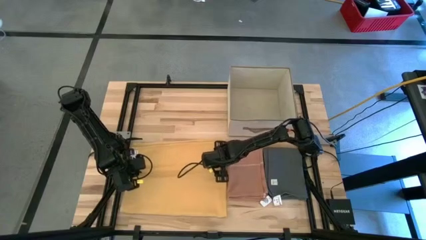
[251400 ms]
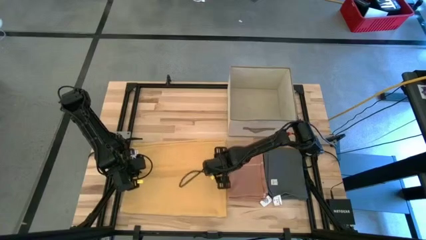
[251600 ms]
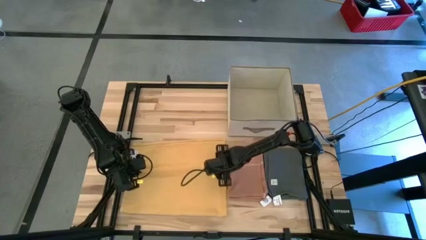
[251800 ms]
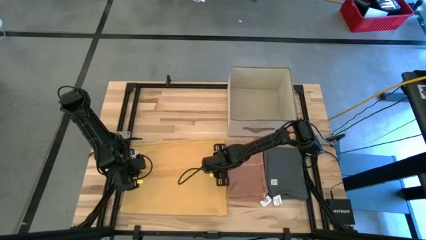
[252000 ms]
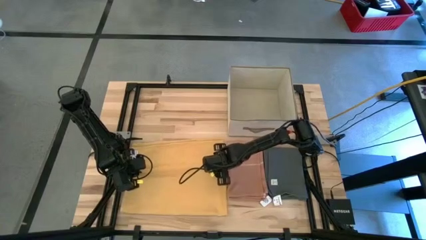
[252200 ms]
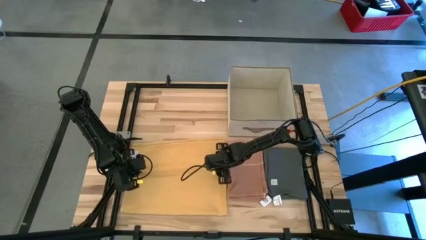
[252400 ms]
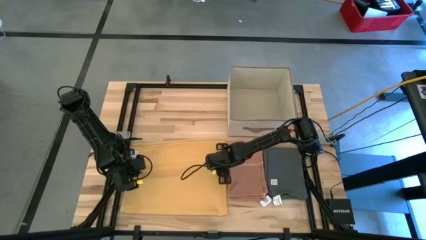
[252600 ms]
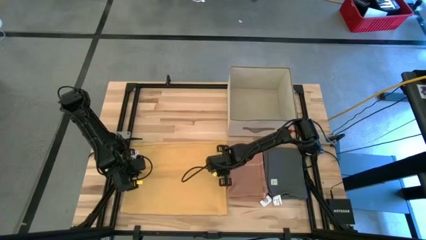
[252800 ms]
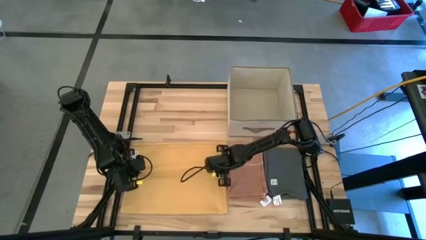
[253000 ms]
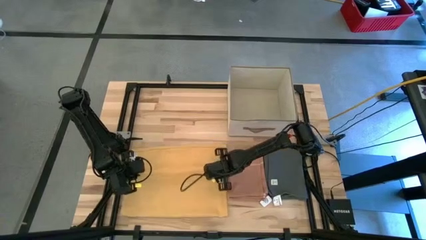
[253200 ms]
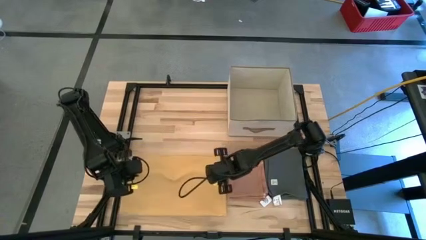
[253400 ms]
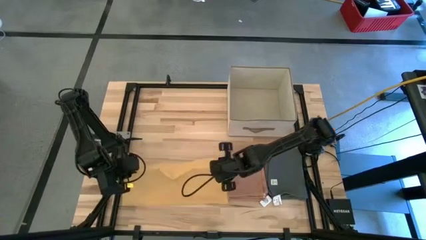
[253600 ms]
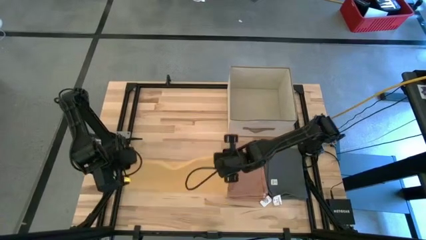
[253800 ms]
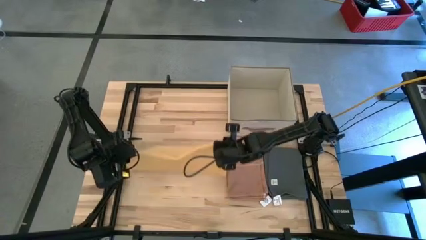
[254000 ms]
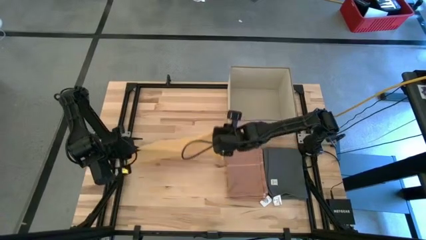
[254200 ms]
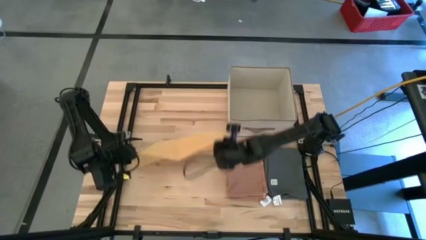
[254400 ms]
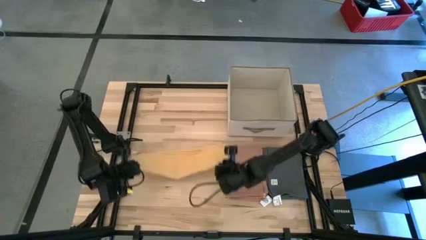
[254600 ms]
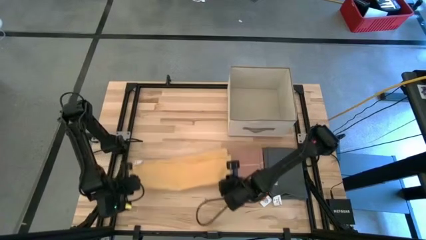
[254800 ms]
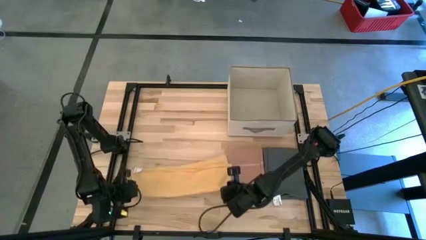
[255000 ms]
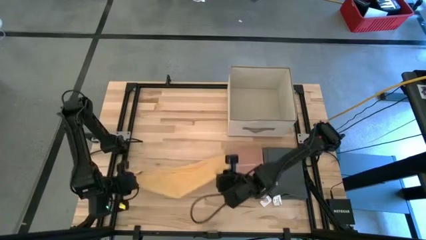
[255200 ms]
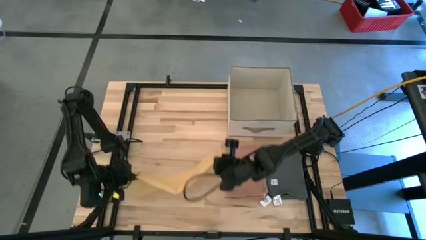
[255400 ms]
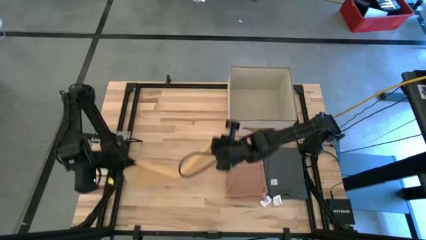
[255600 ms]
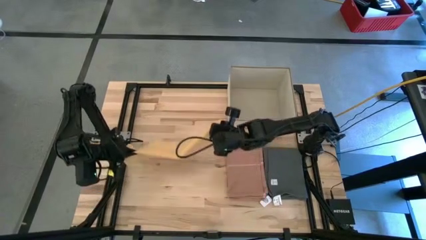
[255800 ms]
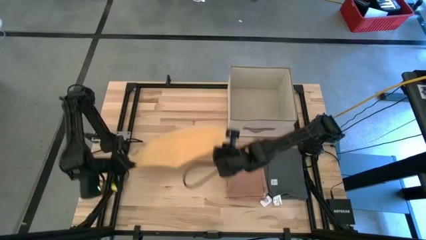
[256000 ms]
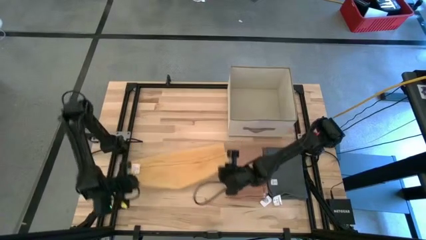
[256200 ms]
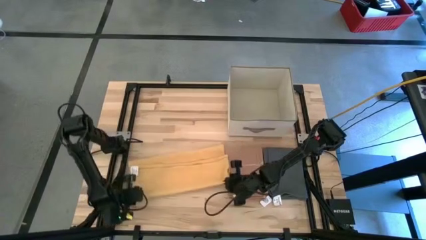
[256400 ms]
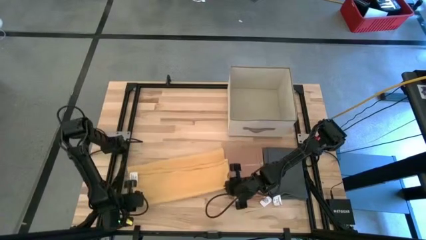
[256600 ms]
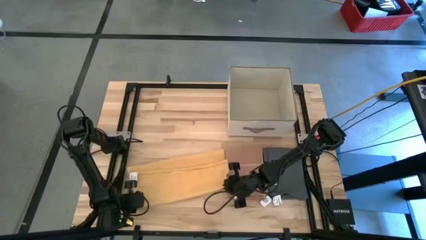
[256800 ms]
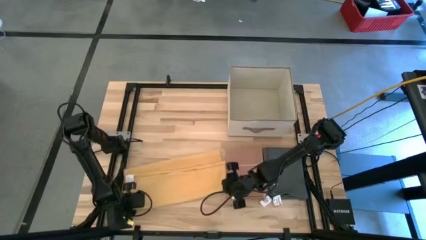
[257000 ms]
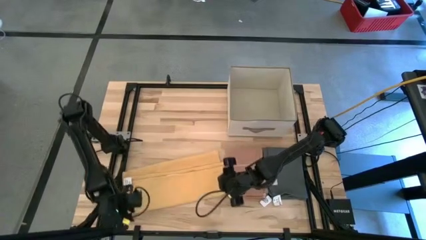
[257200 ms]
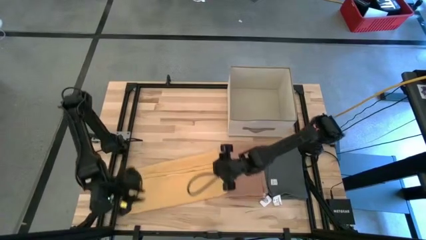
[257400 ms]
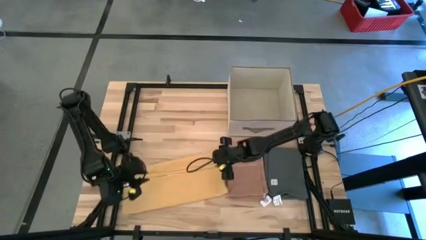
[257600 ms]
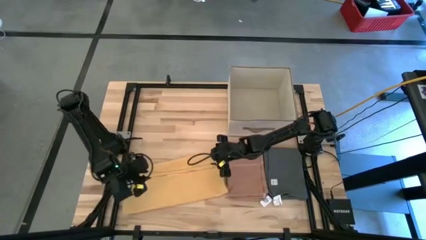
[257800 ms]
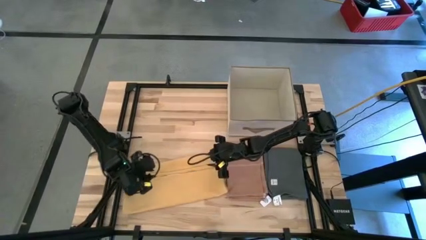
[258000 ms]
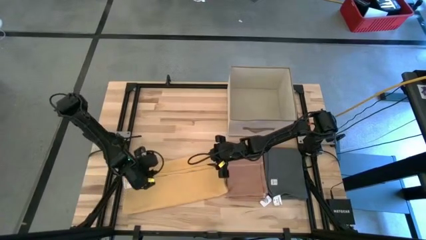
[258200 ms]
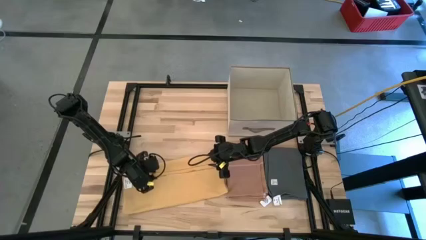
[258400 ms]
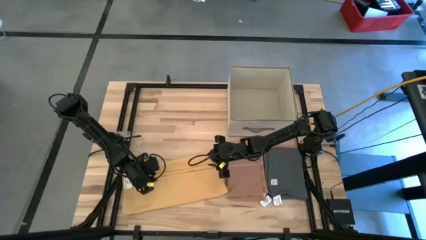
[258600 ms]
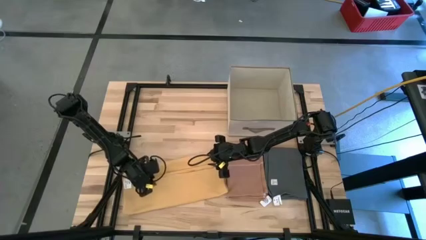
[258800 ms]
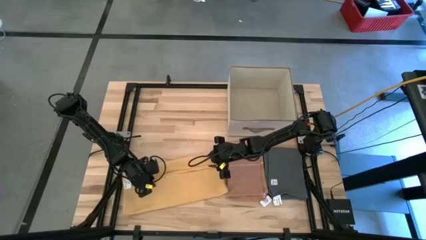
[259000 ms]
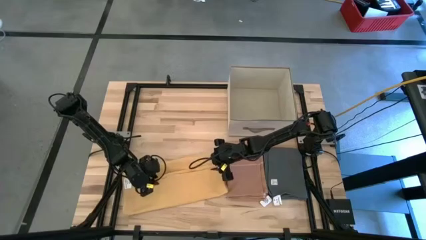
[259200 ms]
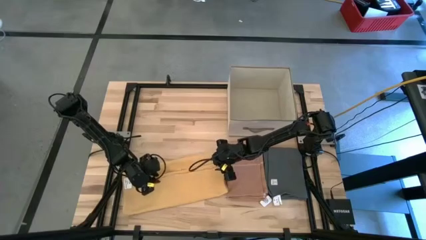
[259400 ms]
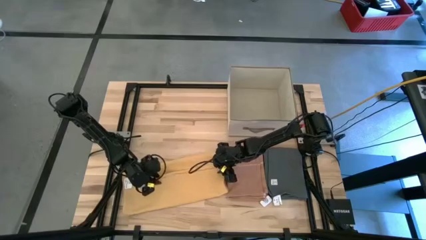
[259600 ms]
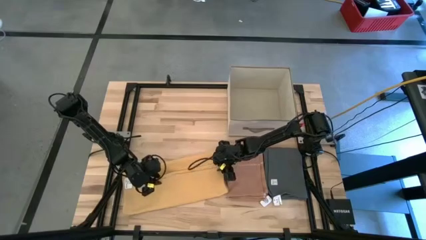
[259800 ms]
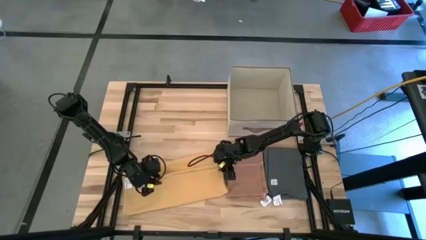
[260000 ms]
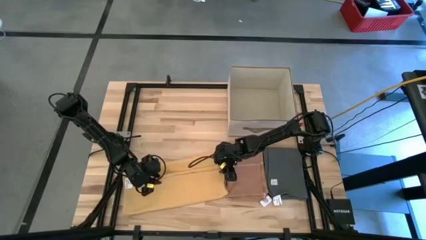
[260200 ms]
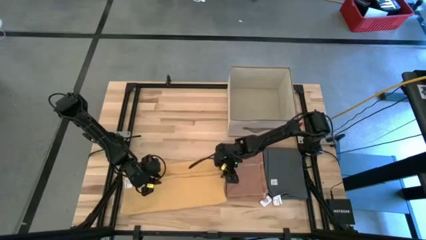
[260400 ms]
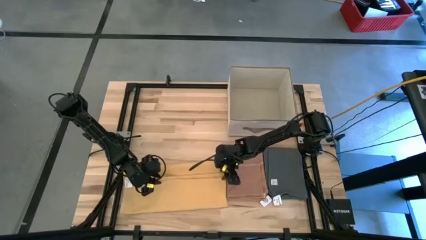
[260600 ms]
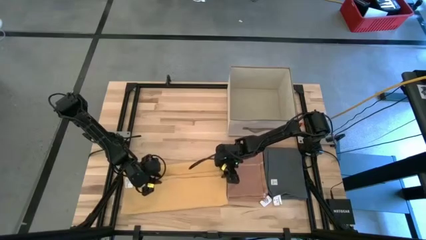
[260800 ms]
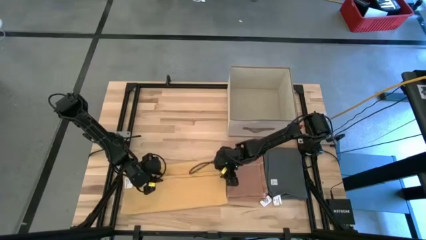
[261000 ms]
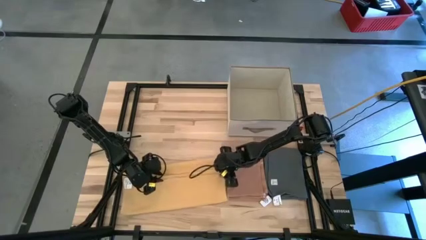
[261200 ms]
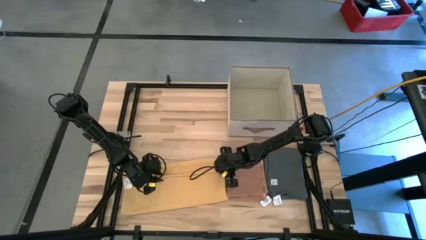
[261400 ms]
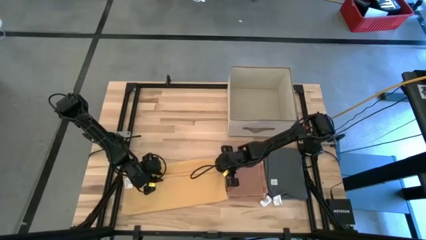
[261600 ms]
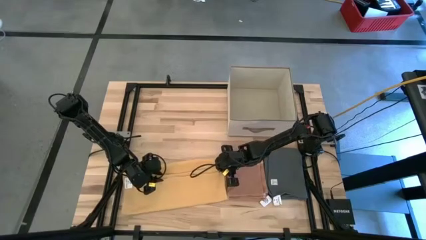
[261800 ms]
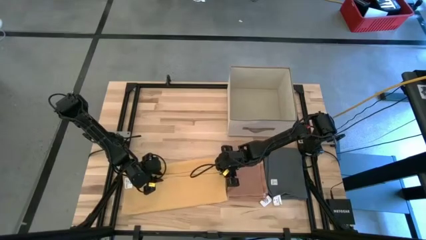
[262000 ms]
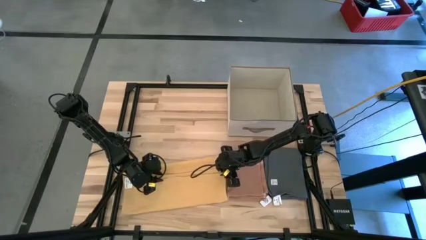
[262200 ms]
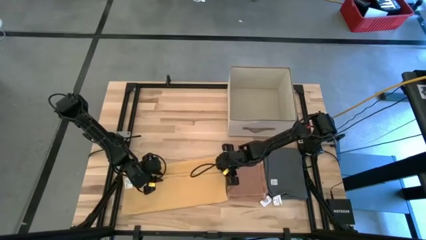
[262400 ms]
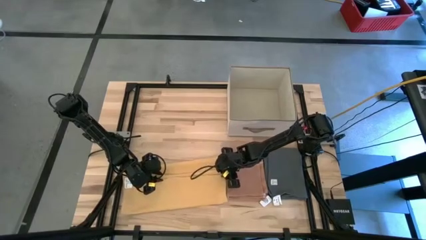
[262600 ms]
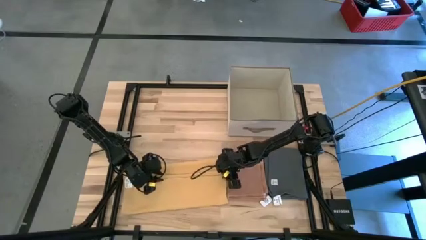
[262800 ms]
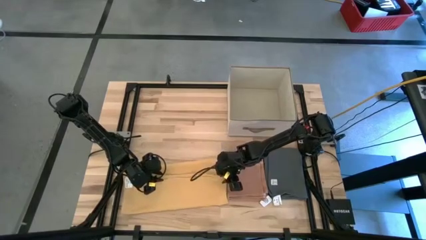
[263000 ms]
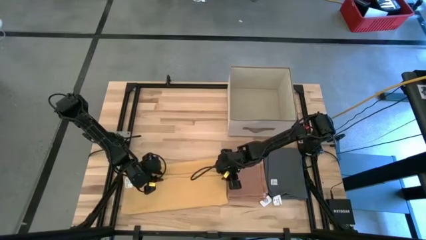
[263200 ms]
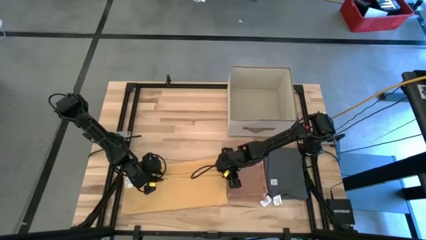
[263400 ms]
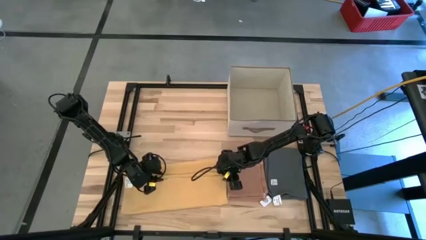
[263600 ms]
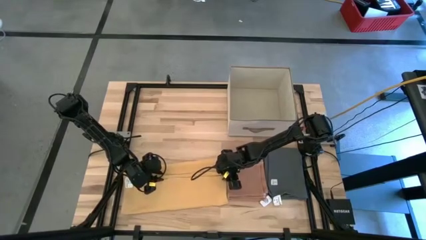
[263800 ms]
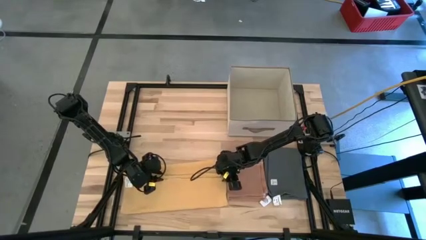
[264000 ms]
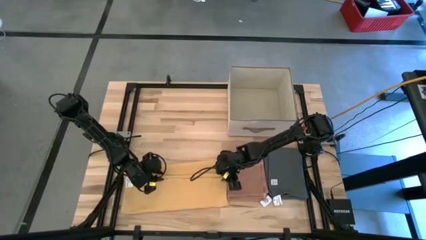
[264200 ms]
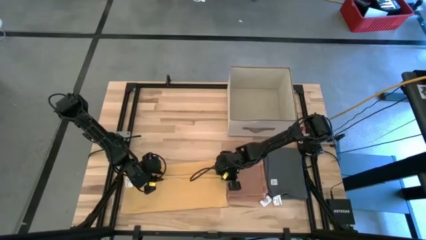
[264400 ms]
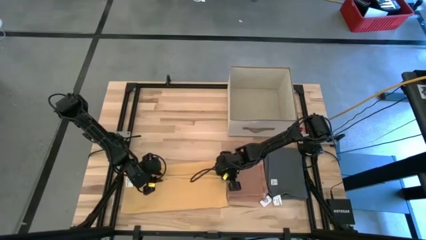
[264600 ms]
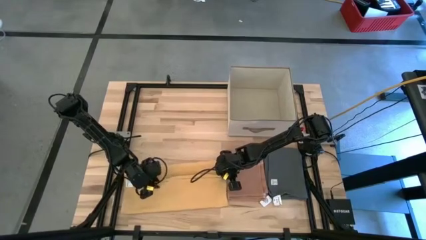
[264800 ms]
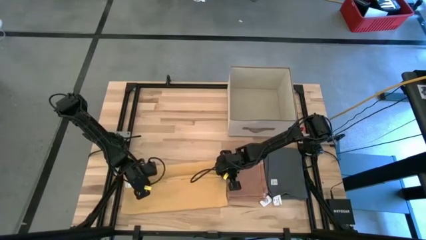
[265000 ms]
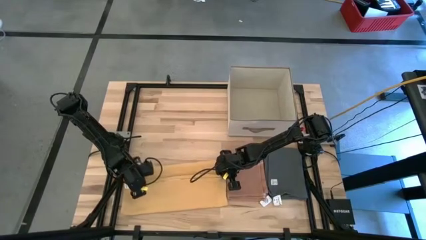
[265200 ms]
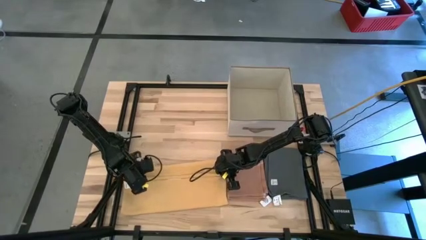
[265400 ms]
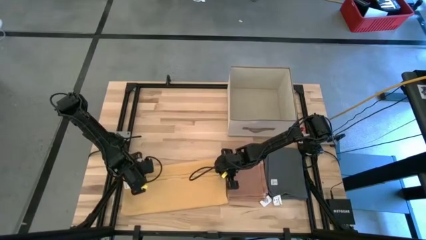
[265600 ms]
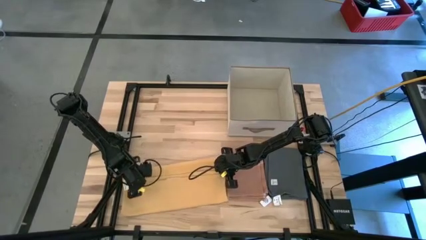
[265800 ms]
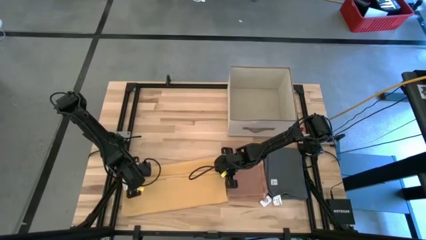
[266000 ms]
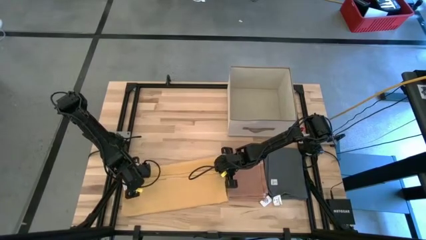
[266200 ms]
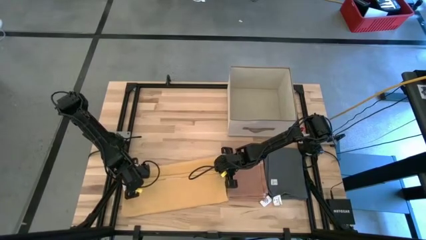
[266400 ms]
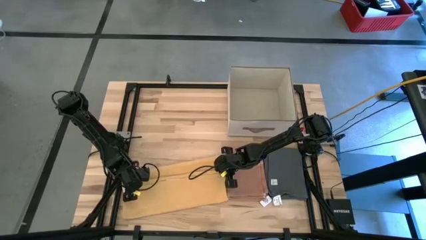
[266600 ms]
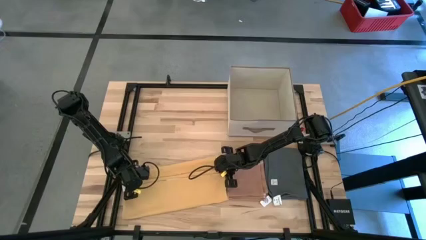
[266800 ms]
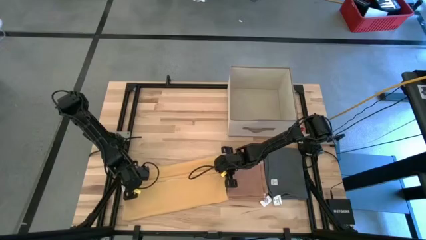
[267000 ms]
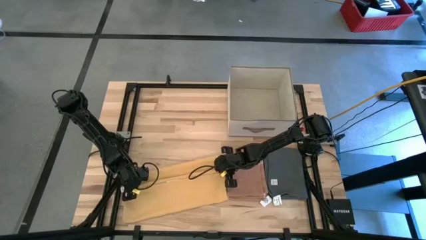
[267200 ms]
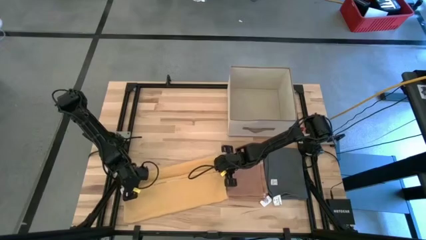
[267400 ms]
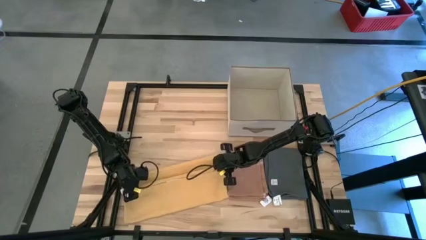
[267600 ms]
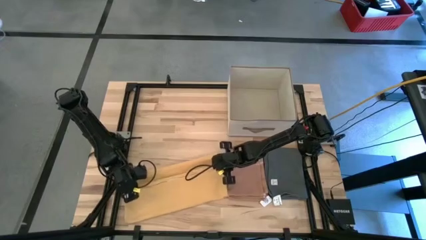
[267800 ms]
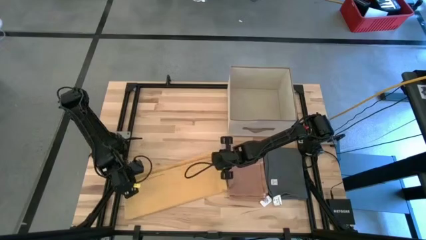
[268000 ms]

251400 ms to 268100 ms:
Task: Fold towel
Fold the yellow towel
